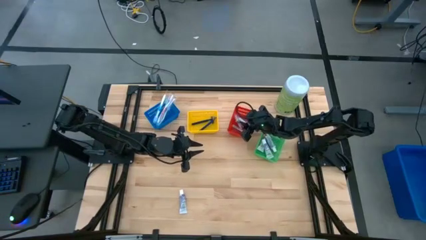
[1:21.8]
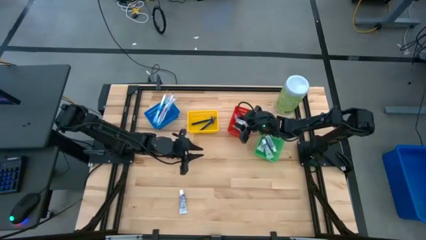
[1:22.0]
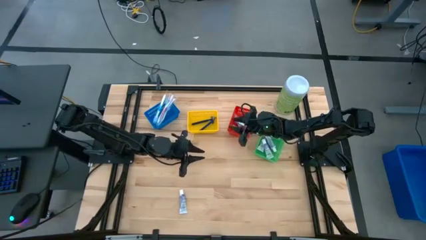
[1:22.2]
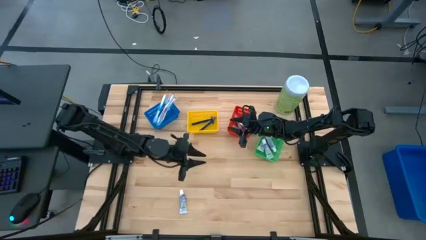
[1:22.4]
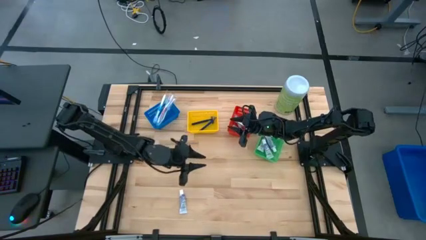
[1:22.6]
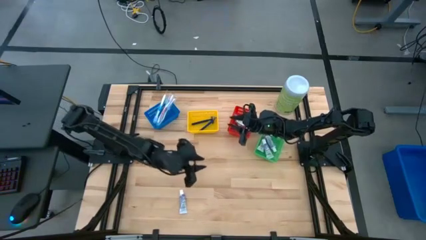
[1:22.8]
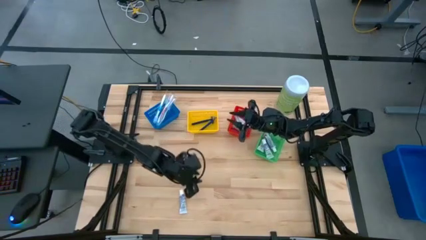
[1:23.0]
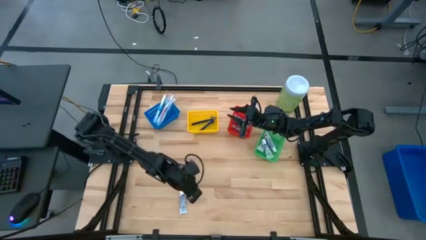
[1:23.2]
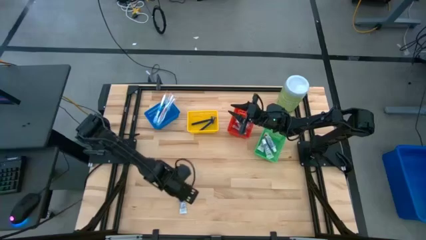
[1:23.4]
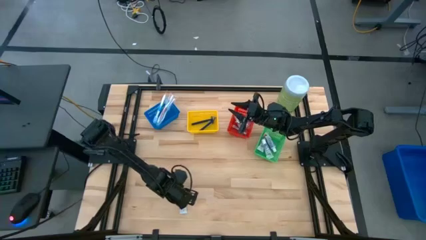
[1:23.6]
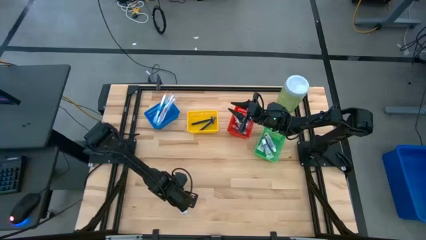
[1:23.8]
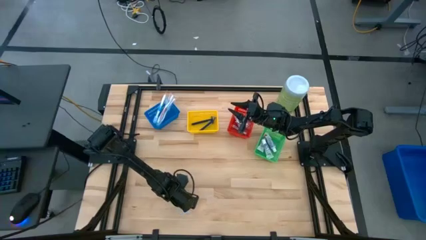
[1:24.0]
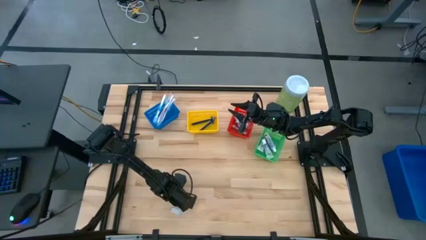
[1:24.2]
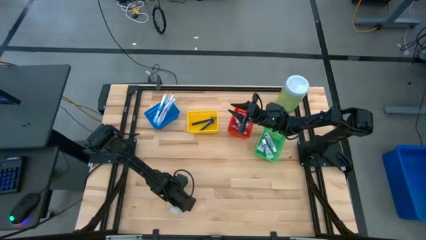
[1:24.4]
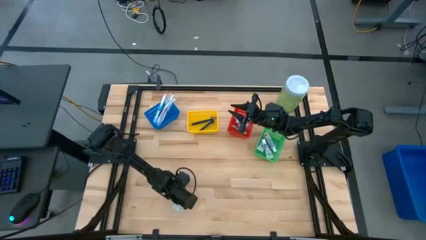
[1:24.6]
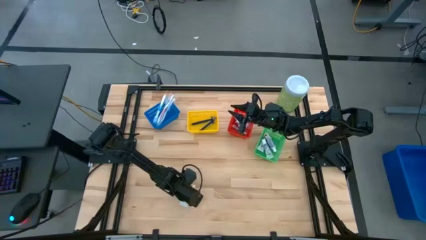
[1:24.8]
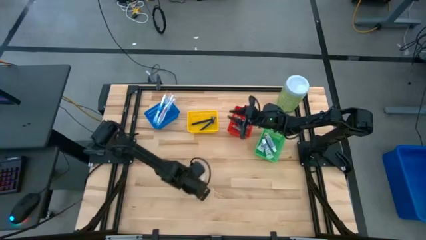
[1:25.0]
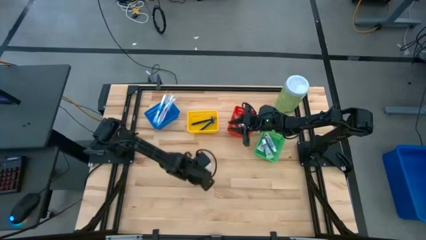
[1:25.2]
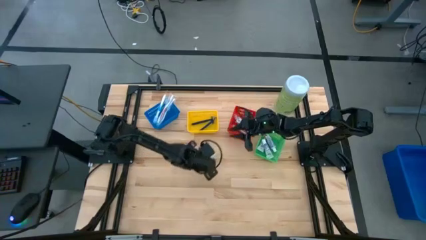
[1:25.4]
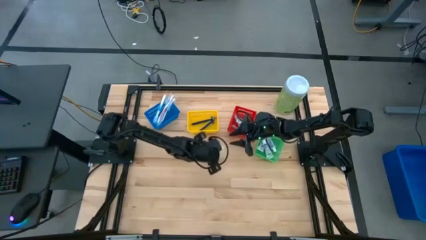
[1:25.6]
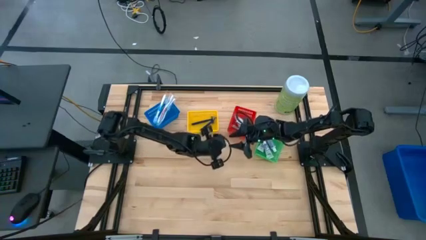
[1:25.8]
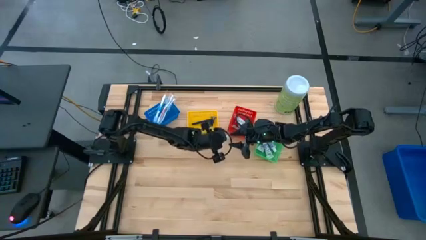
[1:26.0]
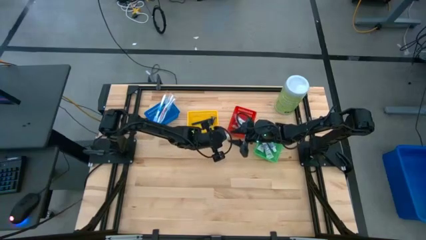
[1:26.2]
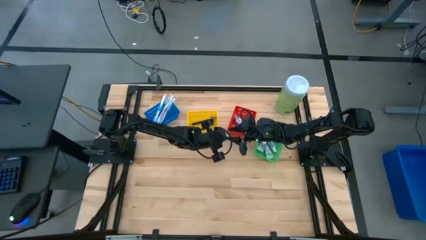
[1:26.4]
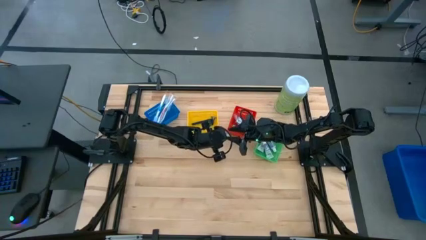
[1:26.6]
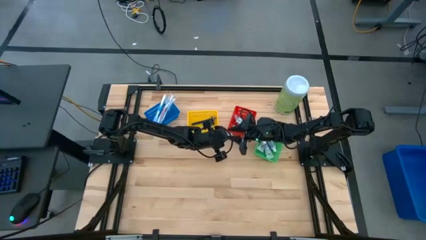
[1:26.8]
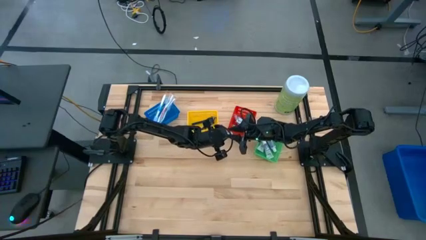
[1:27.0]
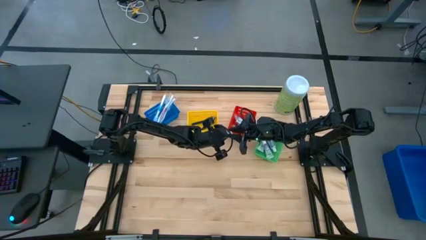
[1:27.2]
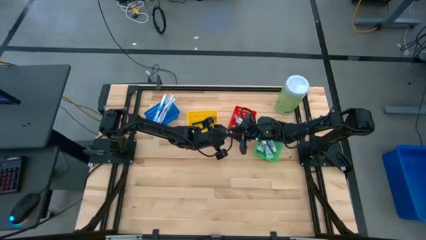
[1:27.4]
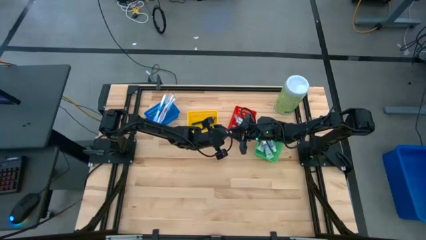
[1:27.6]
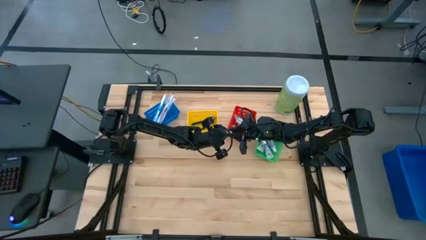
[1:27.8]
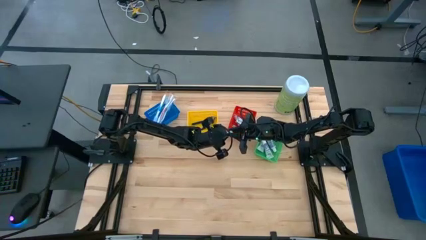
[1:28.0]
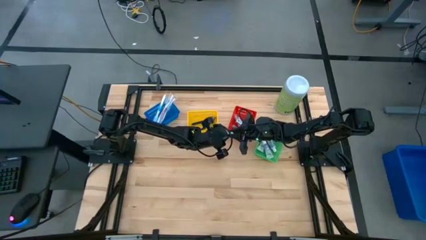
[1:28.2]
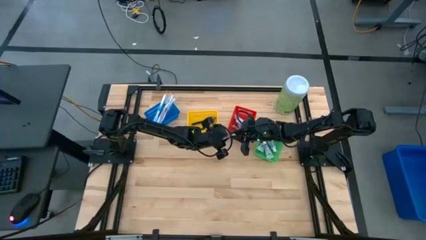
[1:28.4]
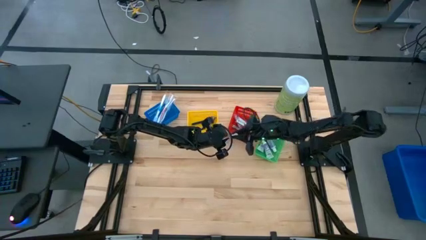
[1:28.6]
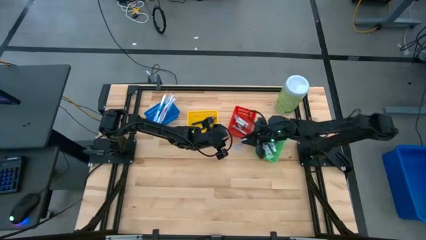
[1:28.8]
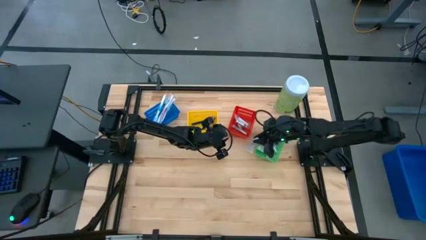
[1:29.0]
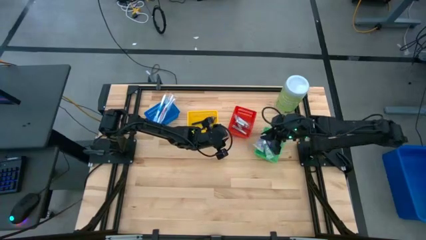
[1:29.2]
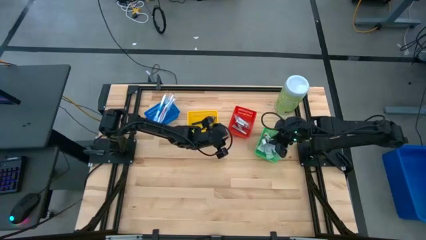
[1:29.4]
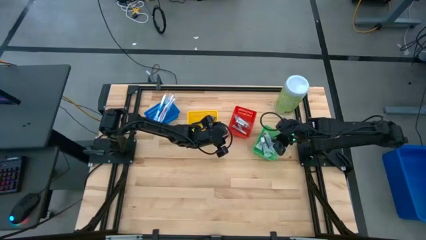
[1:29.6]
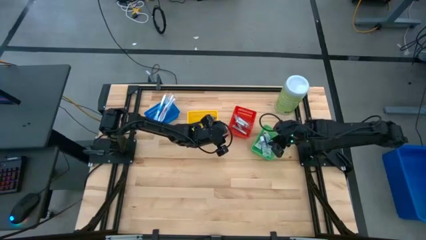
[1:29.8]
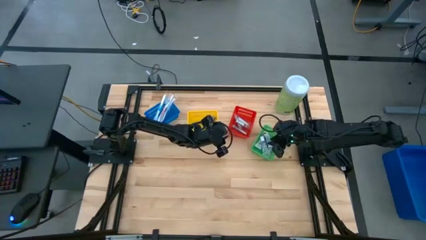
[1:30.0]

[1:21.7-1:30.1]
Task: Pick & Place Travel size toiletries
Put the white toothpaste into the green bin

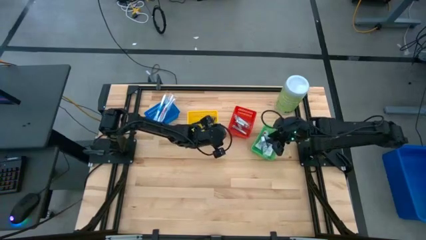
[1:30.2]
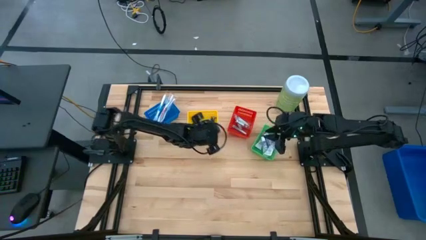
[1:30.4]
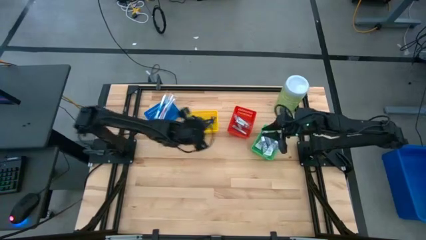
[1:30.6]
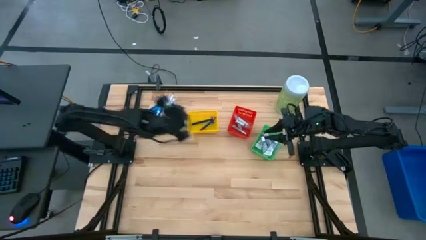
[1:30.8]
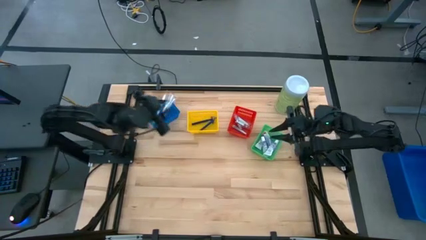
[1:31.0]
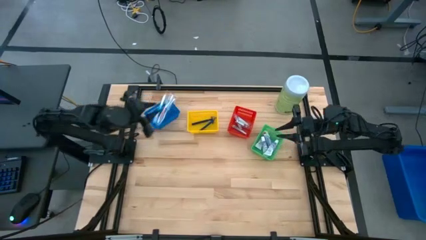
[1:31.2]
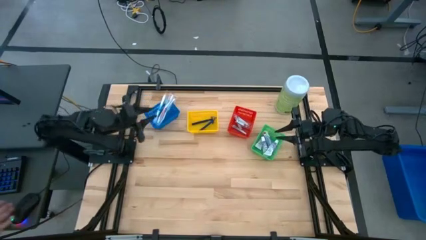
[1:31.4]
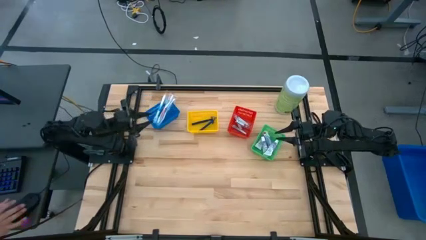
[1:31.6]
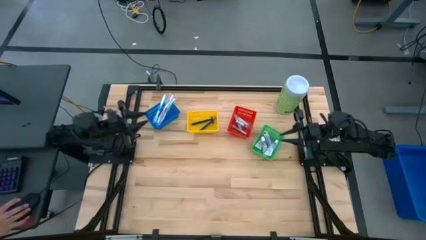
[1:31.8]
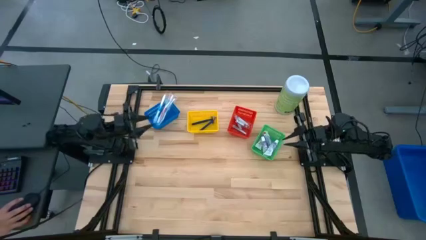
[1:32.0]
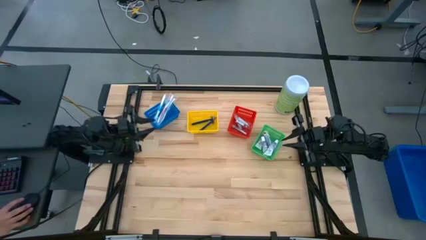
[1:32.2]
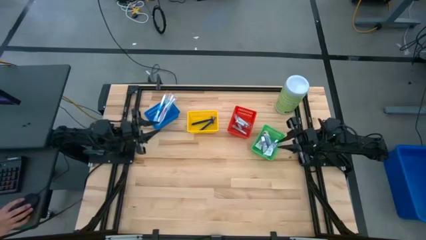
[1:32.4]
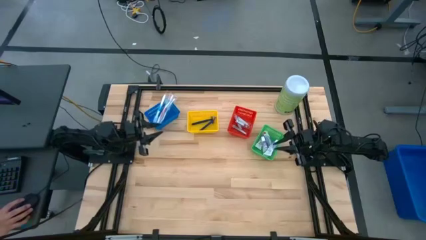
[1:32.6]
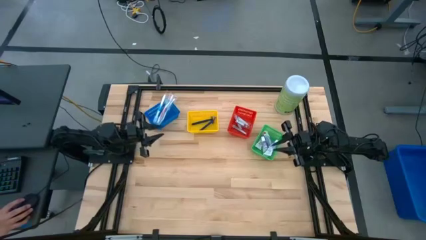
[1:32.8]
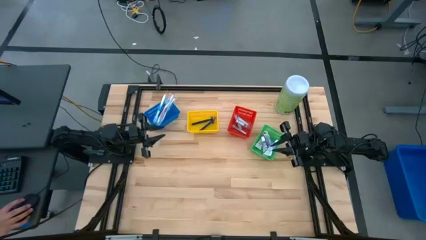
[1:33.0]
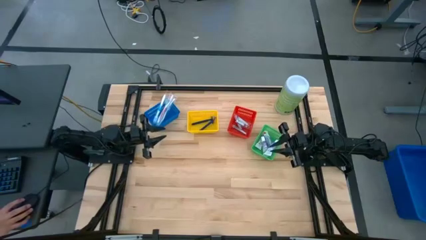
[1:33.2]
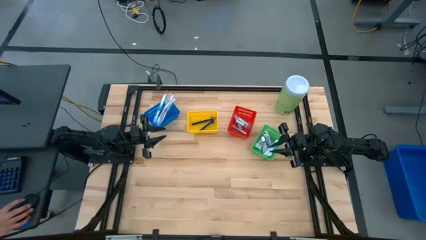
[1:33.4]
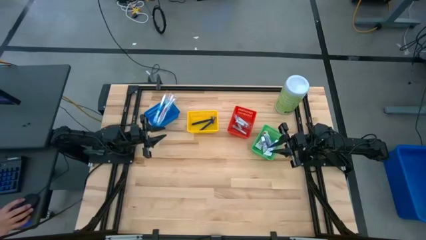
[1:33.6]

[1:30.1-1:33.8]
Return to Home Position

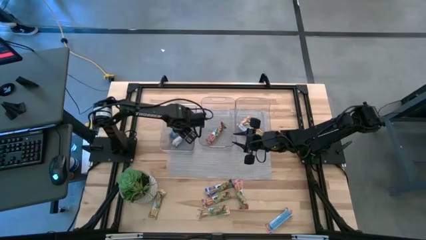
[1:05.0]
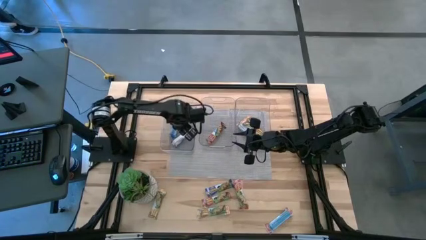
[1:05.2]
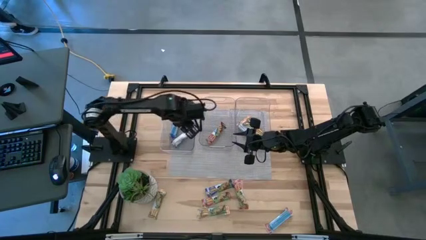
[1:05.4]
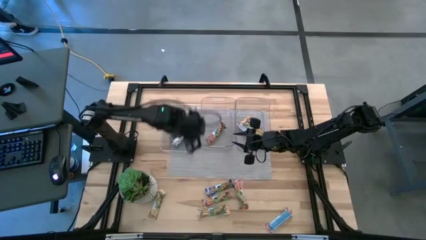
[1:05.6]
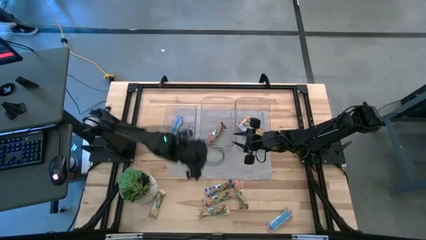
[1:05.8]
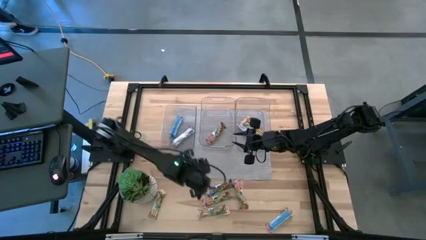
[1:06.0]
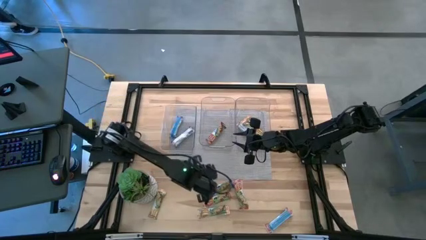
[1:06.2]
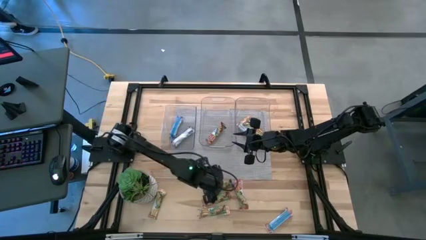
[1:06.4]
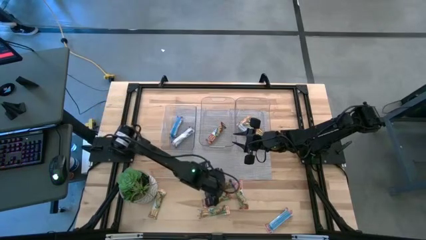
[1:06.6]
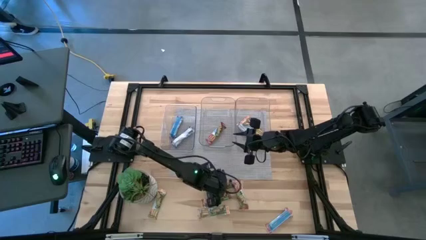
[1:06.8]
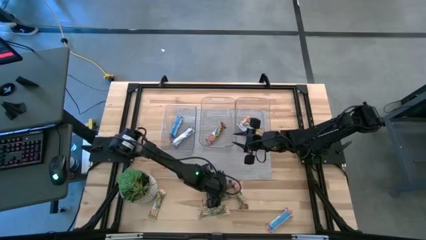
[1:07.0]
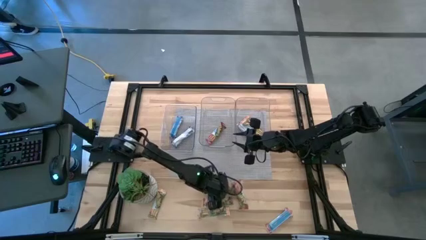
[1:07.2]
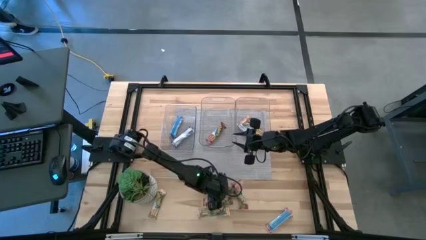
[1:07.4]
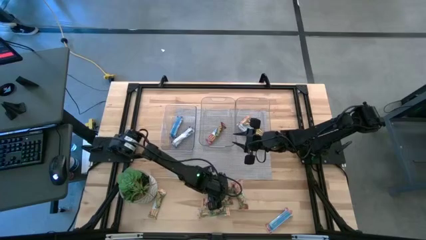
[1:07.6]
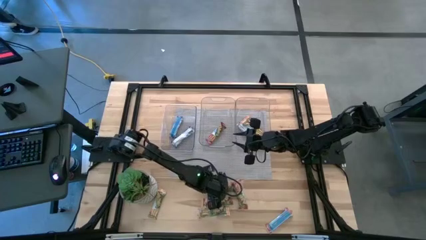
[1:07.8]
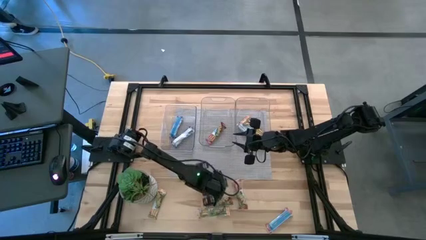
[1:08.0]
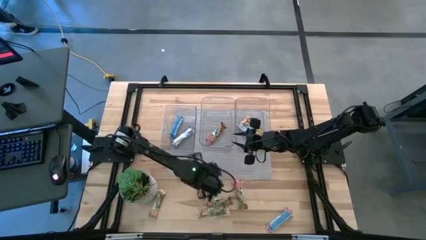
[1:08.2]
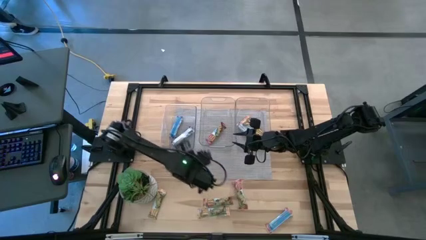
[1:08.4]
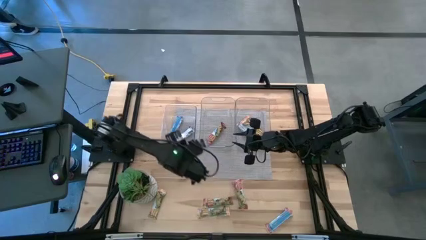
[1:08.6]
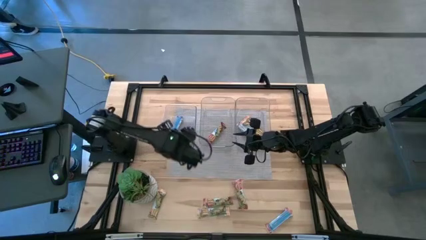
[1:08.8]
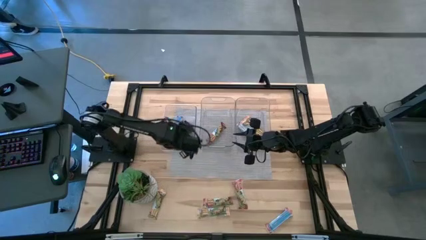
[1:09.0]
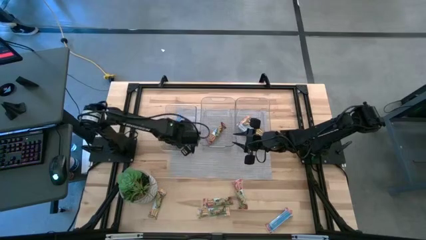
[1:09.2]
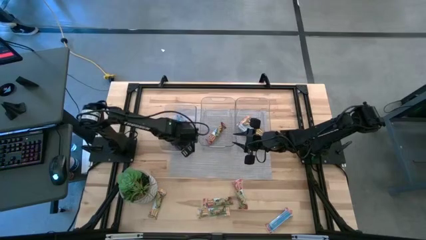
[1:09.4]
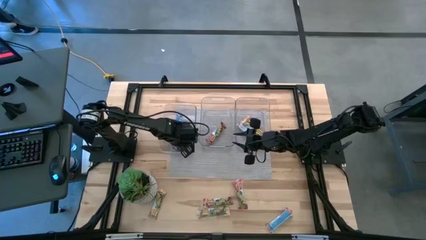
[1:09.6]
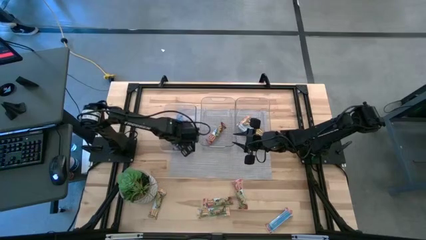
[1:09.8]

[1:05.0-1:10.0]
Task: Pick and place Granola Bars by type
Put the blue granola bar into the left transparent bin
